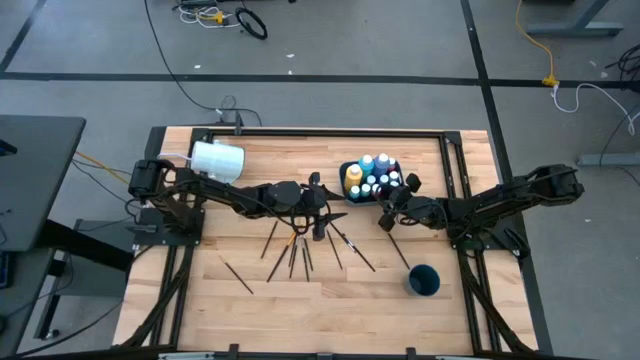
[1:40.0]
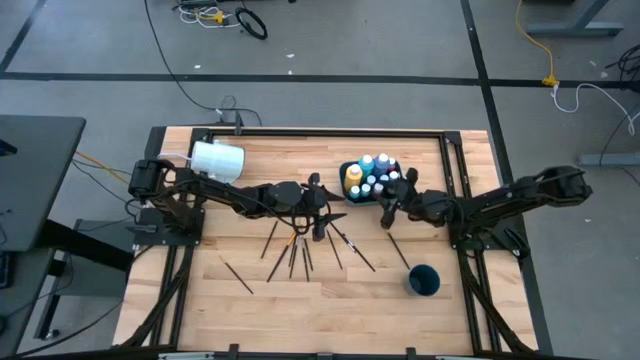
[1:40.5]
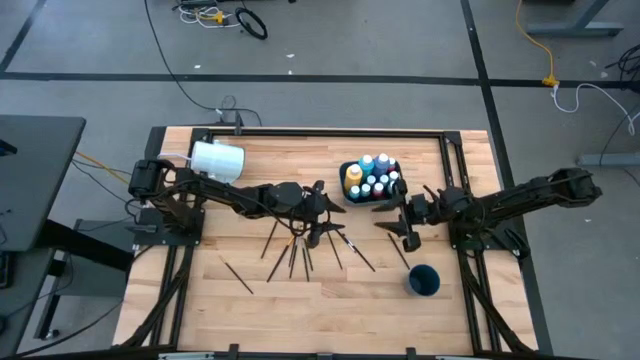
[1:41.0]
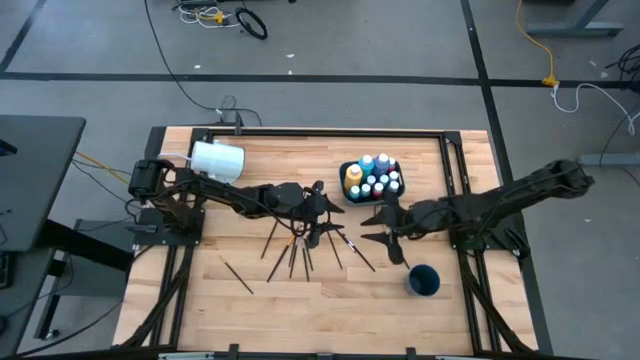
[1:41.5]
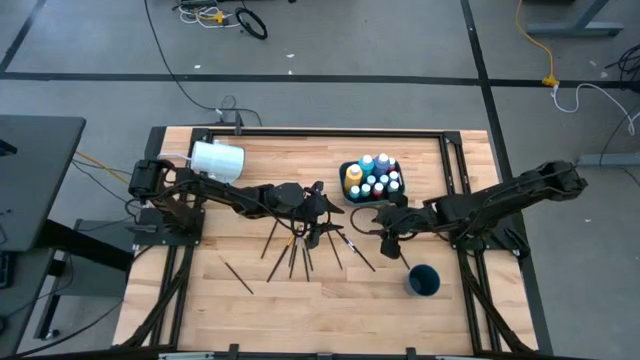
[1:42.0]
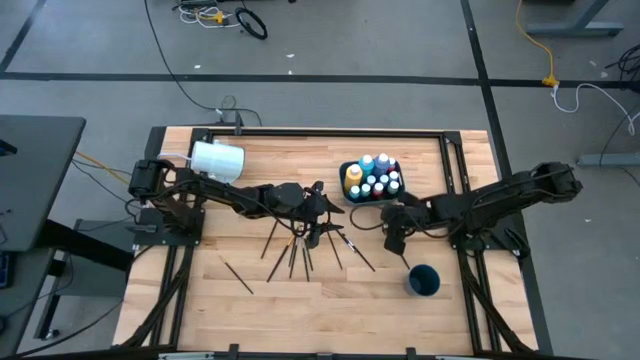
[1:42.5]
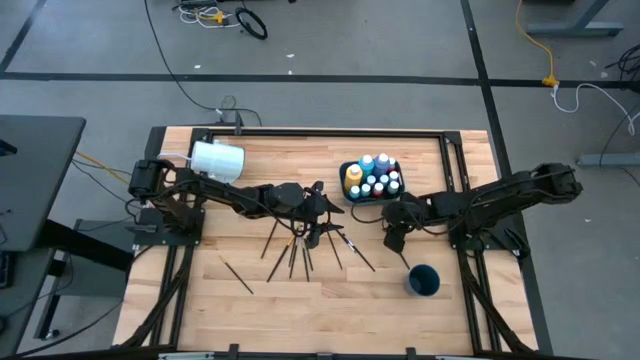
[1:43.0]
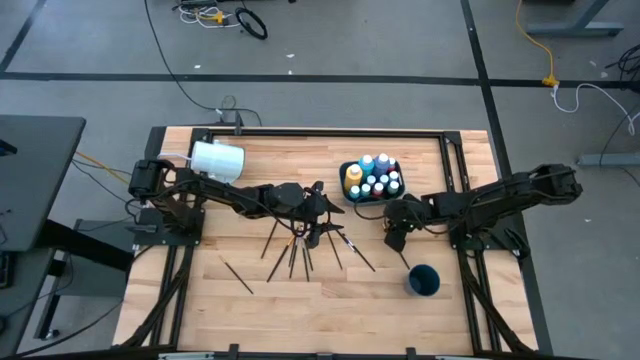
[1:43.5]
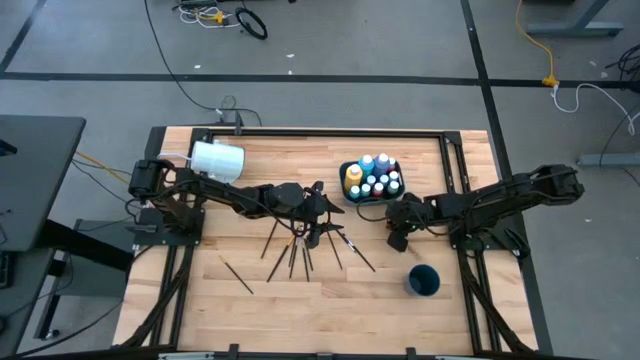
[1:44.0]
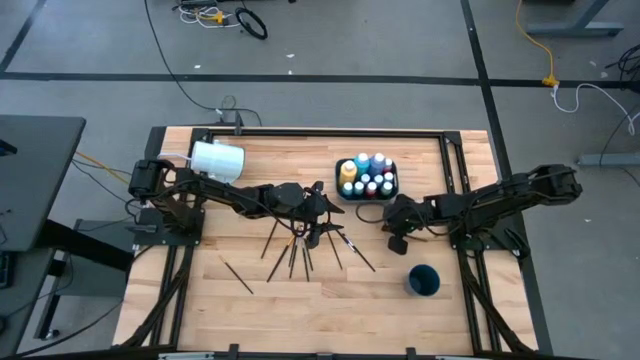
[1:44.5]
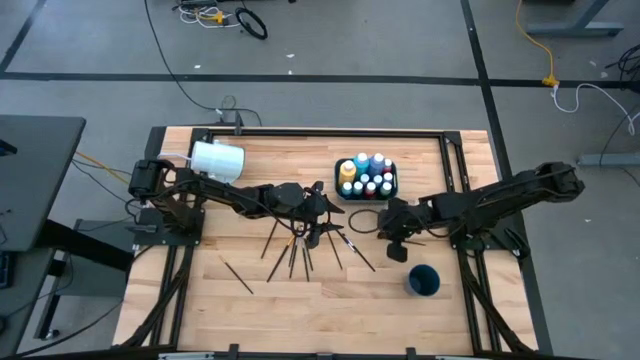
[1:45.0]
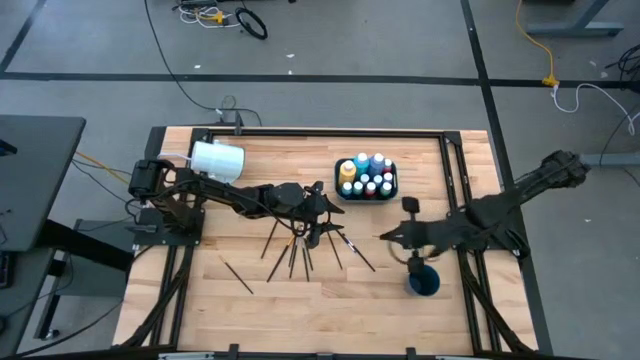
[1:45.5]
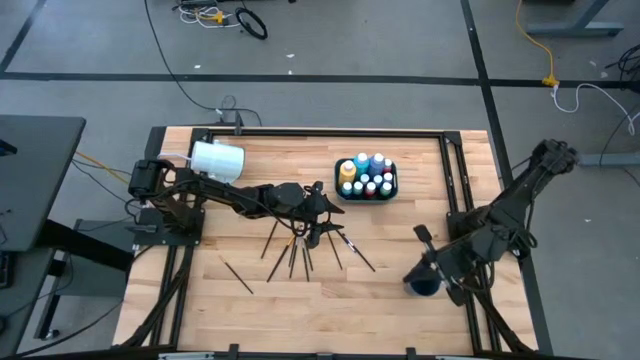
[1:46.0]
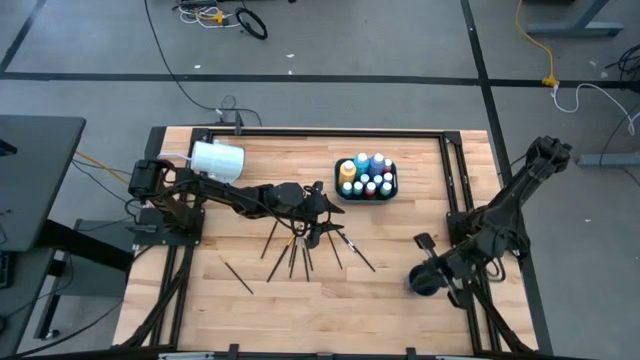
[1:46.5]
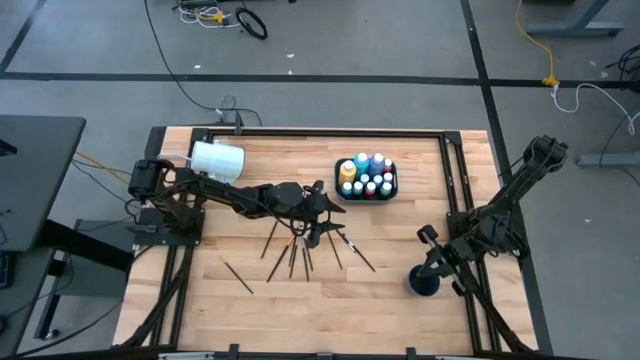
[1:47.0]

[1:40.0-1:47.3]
Task: Pick & Place Paint Supplies
Put the gold paint brush into the cup

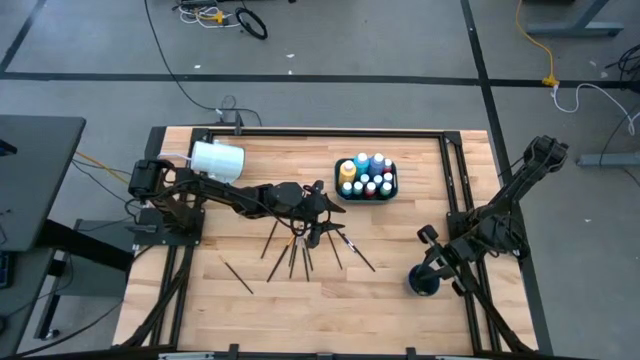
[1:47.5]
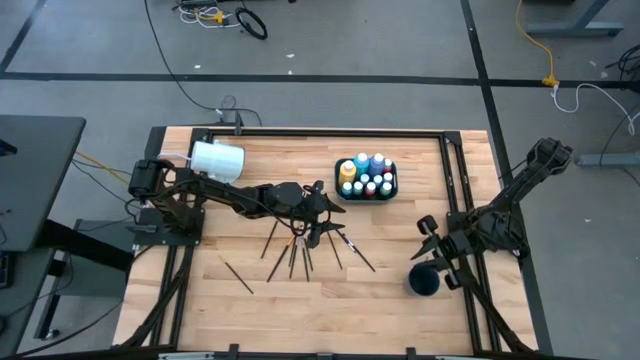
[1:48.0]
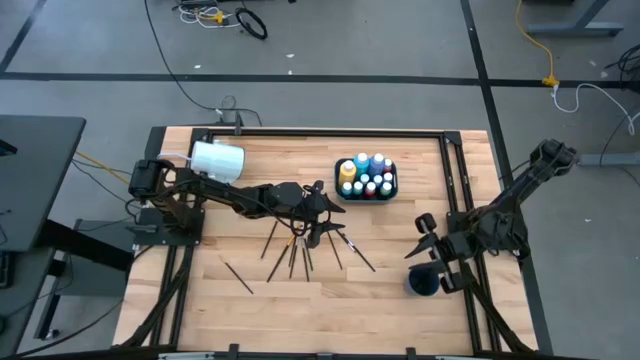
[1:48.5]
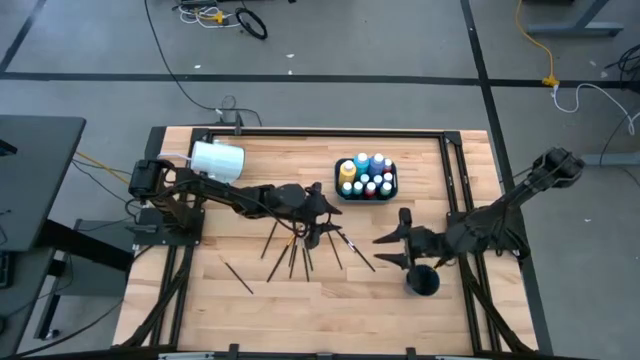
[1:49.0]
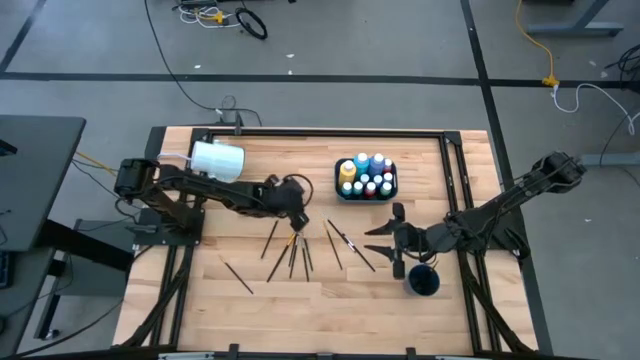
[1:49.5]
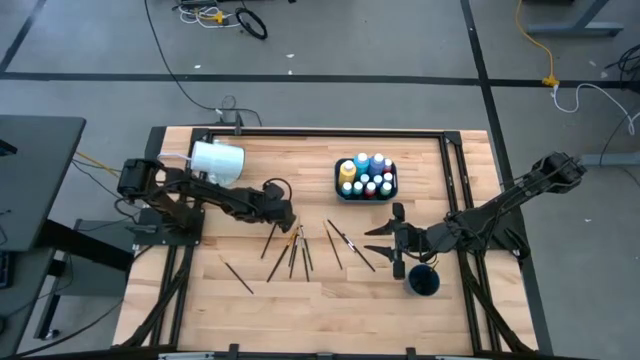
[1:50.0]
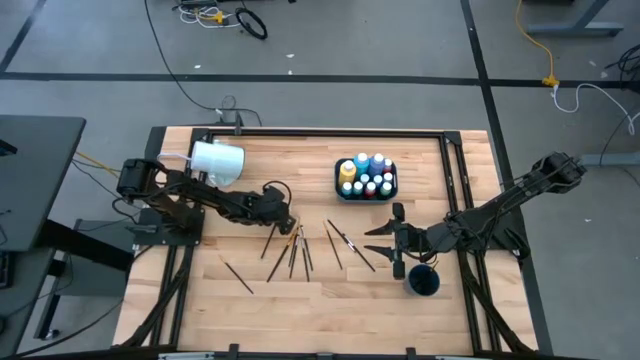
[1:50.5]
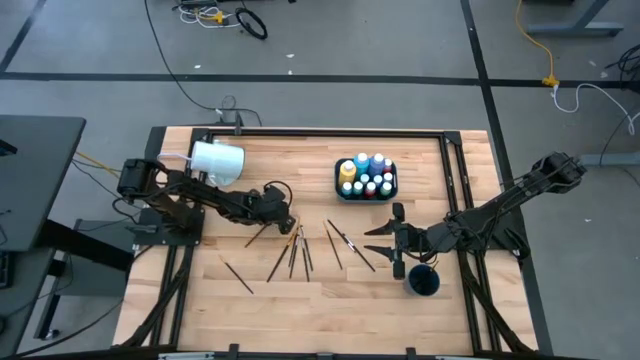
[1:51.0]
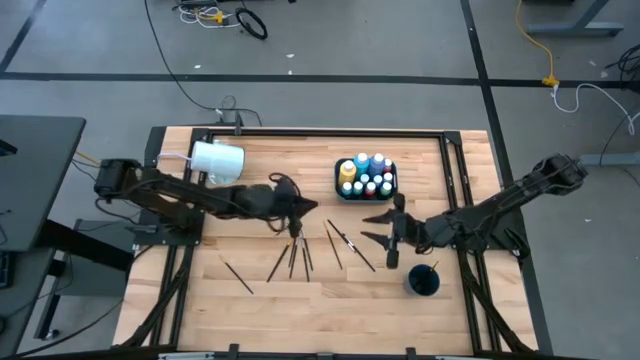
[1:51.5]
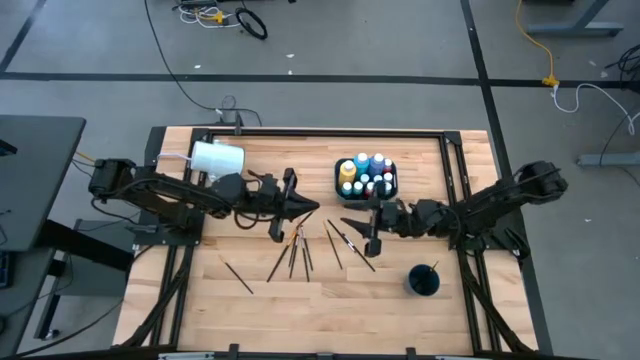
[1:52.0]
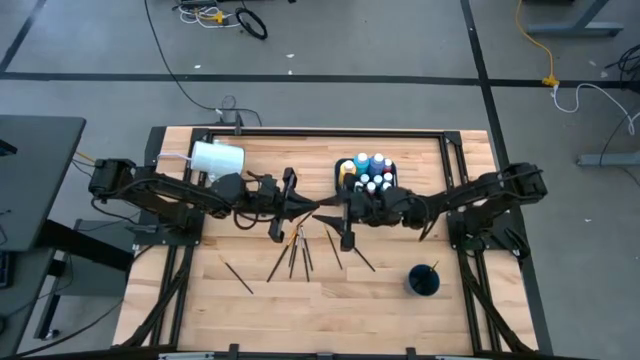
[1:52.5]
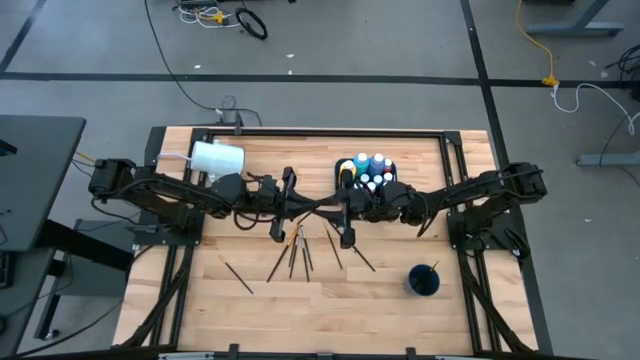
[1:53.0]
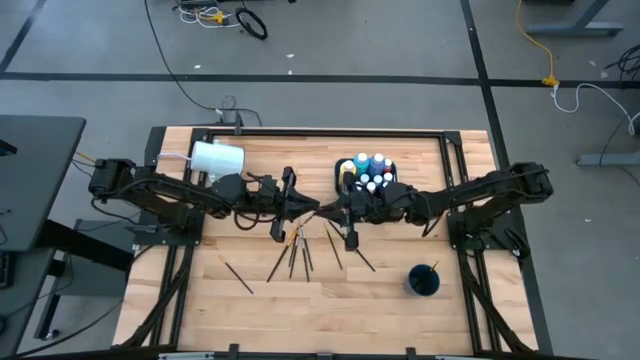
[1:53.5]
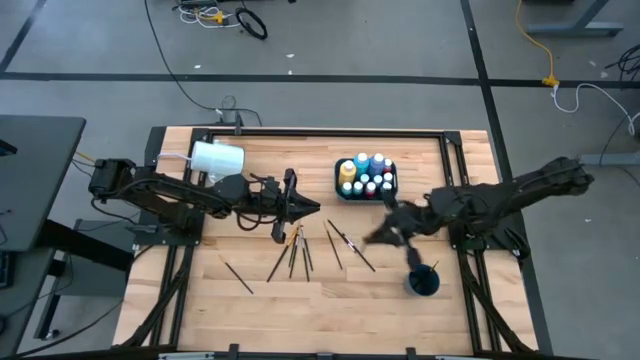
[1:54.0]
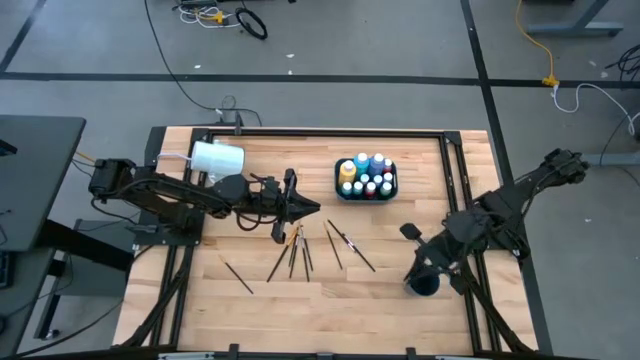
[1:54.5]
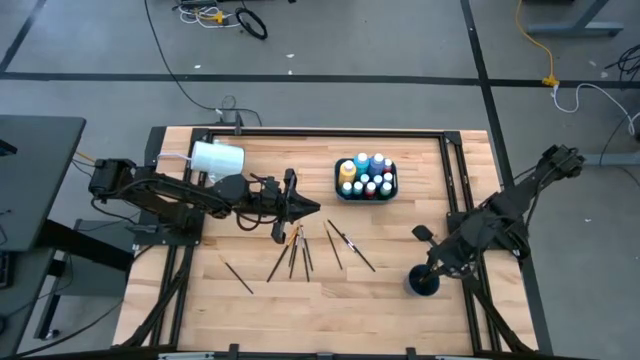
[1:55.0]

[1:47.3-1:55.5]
Put the gold paint brush into the cup

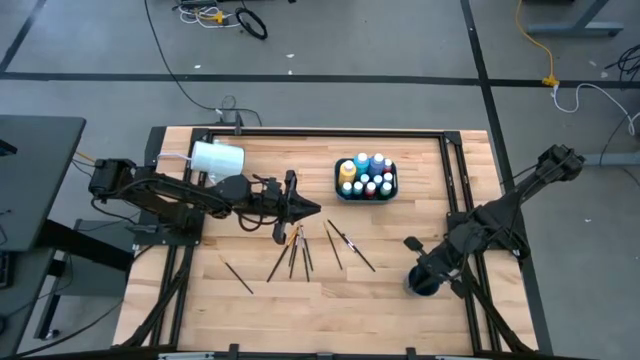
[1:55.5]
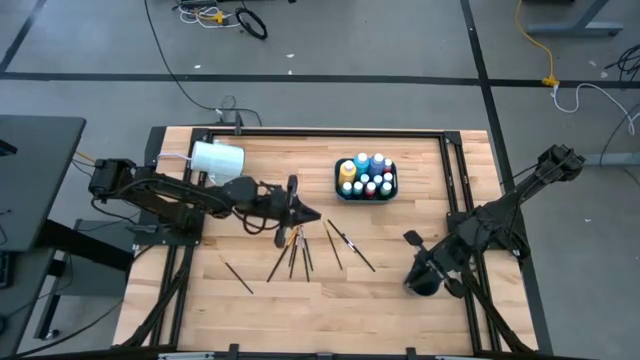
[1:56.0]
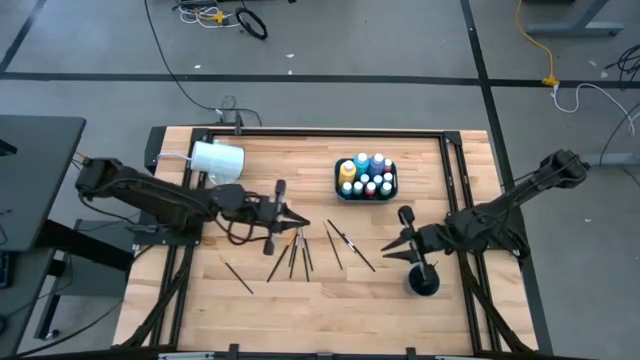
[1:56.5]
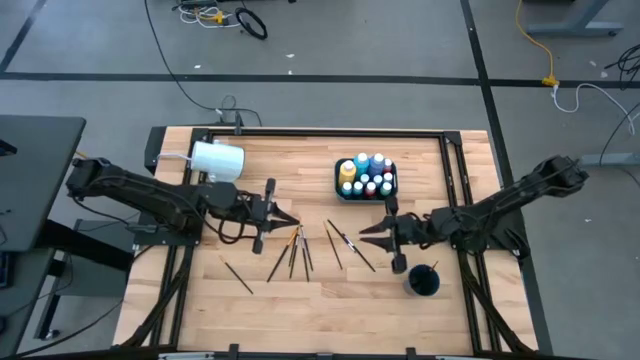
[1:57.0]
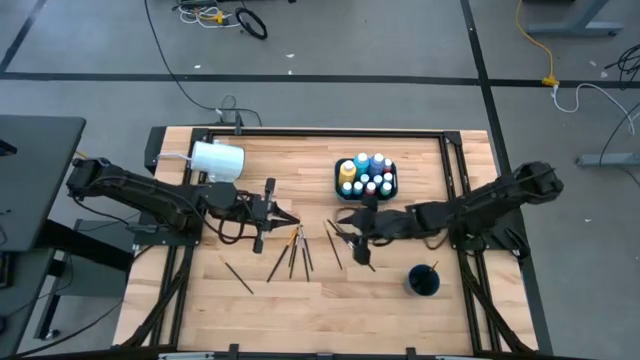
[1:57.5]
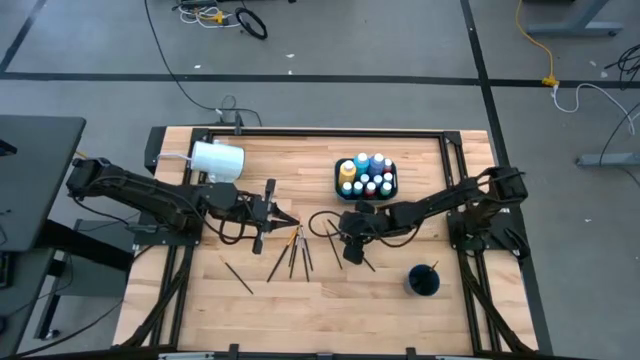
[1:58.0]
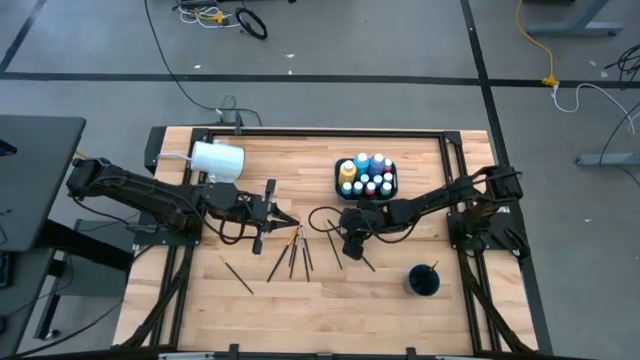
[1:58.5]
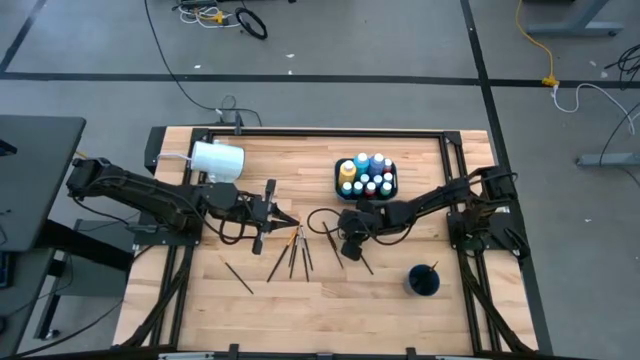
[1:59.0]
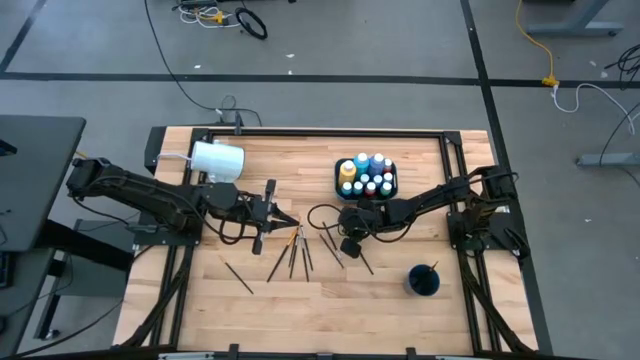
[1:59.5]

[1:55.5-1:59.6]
Put the silver paint brush into the cup

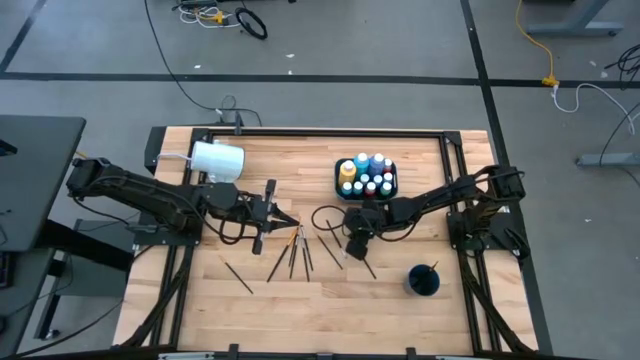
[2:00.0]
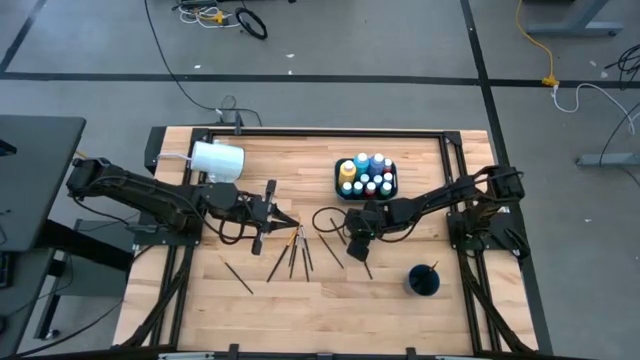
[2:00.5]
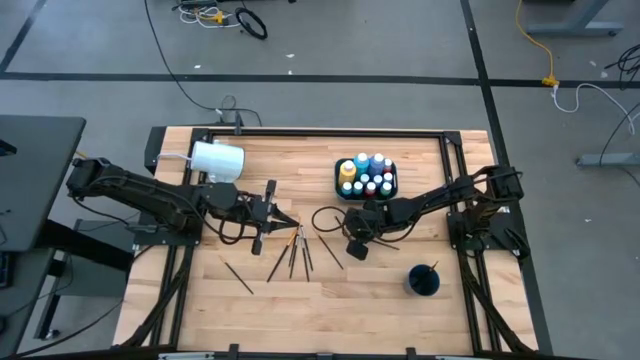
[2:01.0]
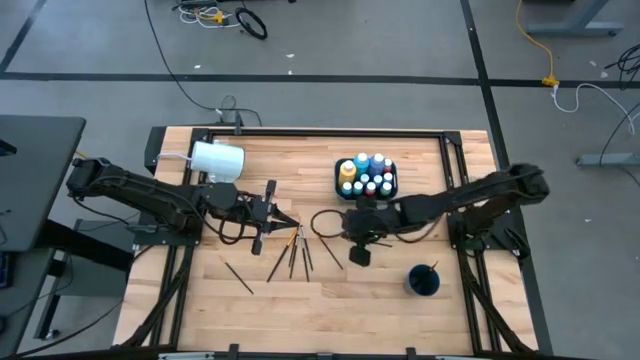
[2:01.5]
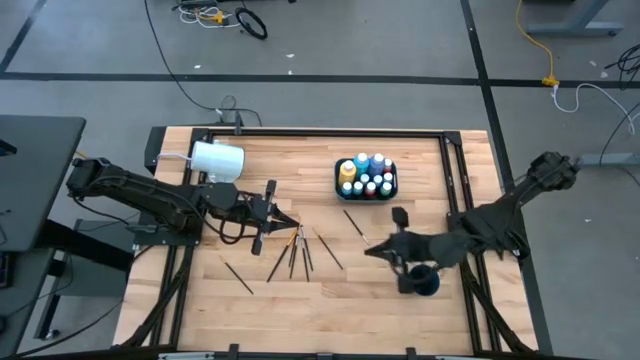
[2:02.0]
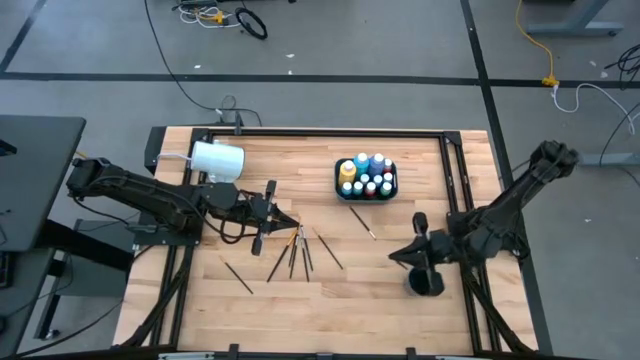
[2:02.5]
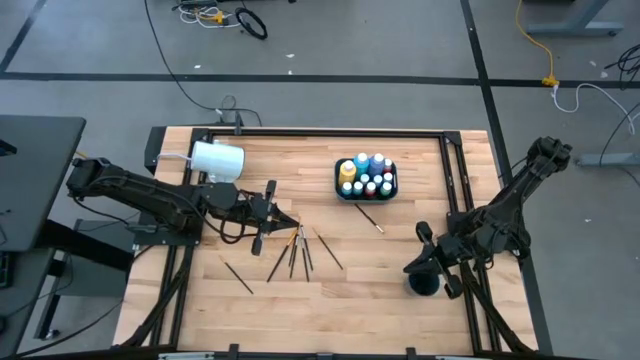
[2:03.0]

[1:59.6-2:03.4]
Put the silver paint brush into the cup
